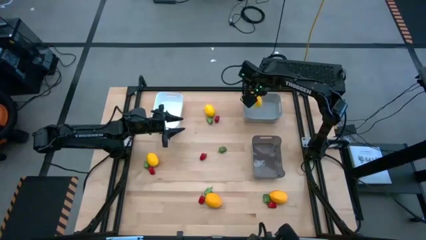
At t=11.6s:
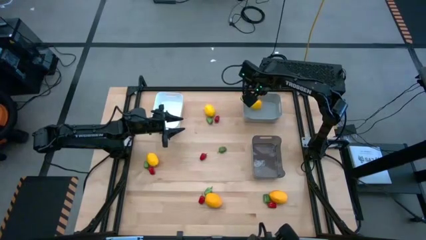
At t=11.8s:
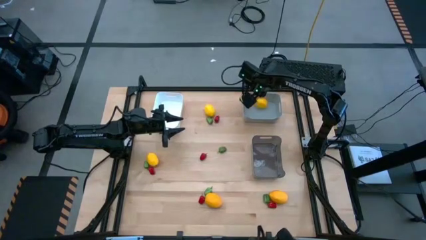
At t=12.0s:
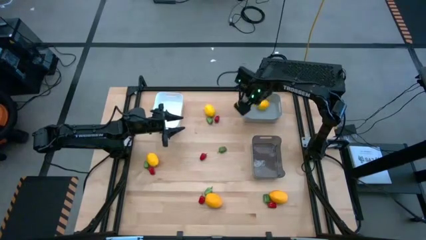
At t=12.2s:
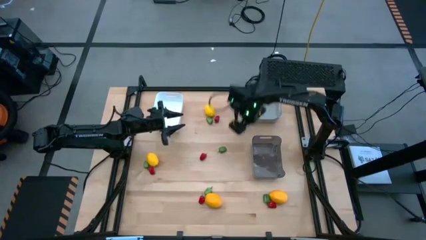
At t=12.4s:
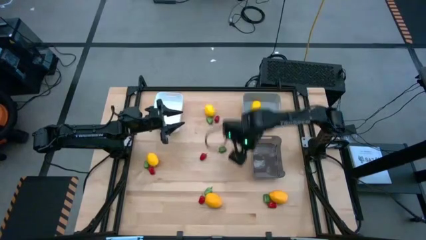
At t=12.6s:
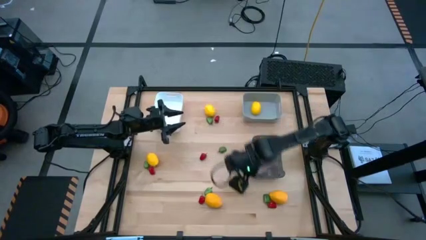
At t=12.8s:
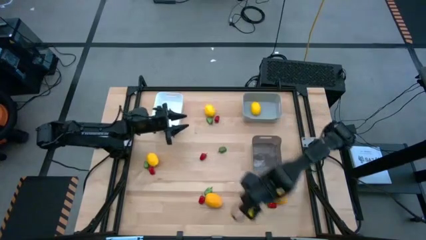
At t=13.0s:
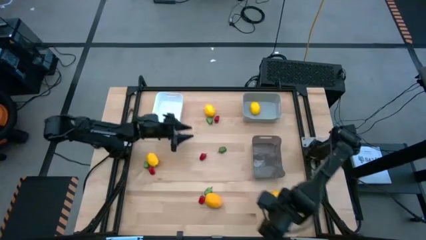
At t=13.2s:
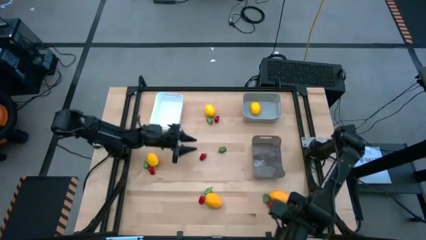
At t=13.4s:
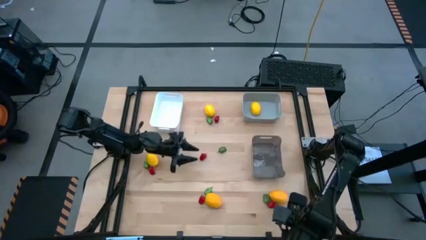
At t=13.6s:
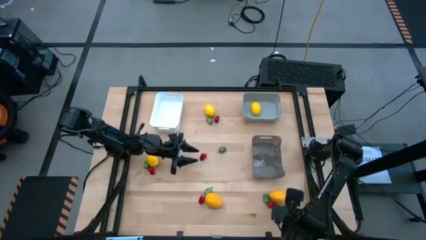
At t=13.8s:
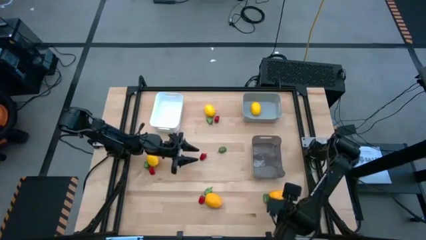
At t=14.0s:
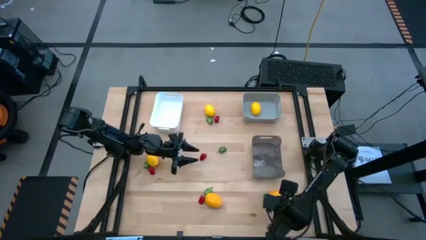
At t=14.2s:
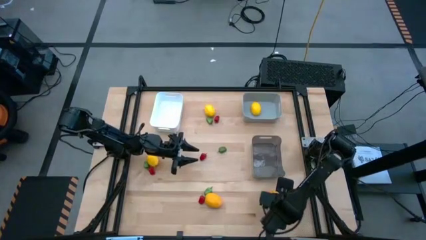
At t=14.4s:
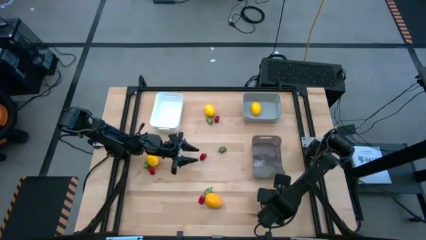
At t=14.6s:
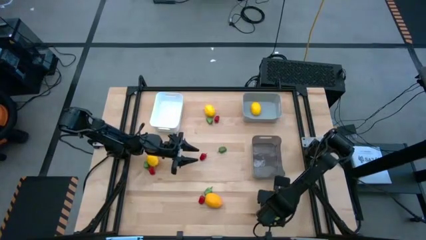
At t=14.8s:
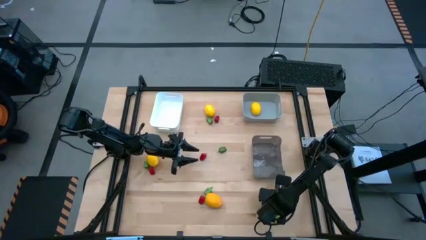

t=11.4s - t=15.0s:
Task: Sort produce into baskets
Put the yellow lemon into the gray bin

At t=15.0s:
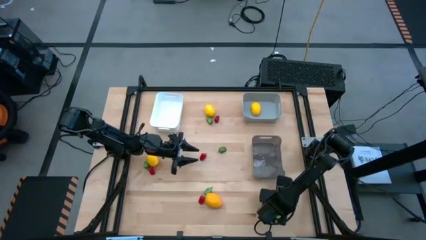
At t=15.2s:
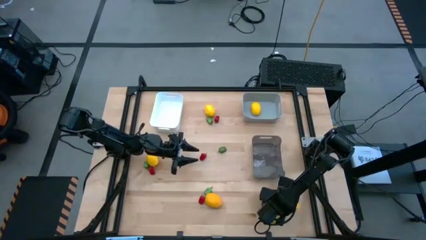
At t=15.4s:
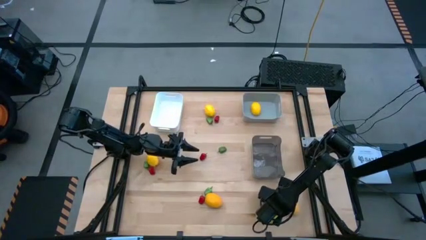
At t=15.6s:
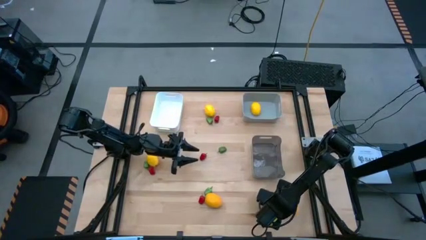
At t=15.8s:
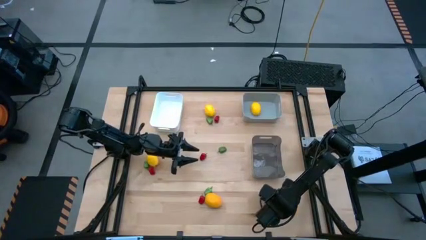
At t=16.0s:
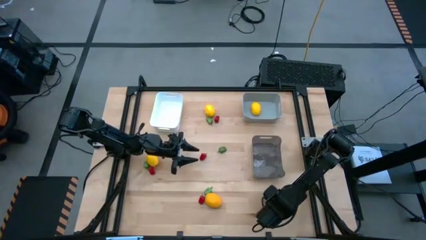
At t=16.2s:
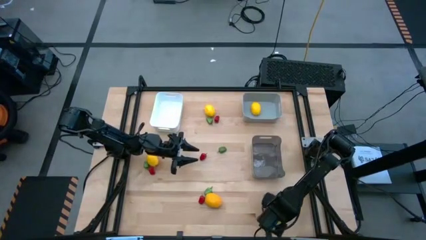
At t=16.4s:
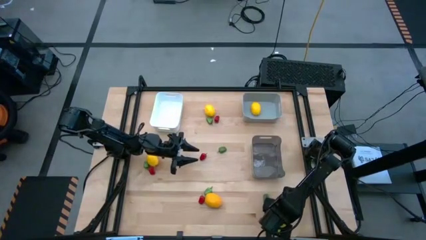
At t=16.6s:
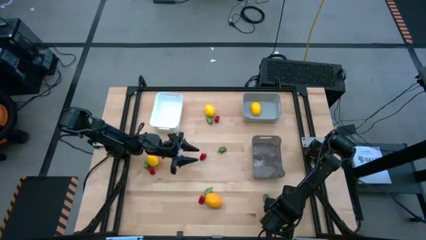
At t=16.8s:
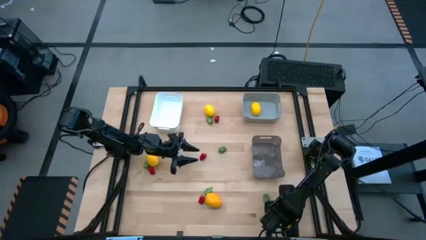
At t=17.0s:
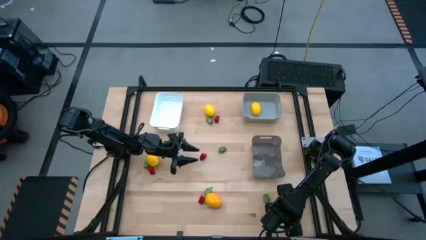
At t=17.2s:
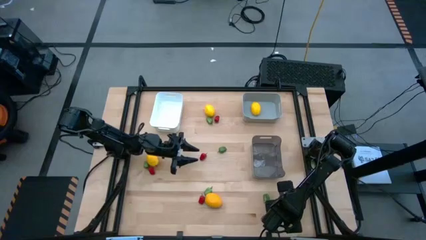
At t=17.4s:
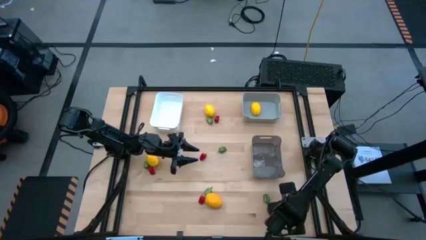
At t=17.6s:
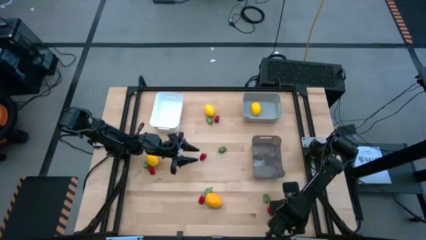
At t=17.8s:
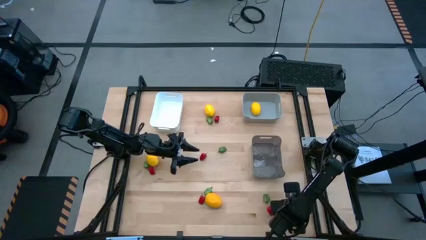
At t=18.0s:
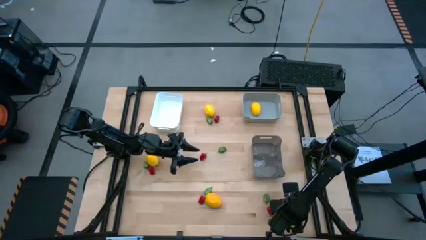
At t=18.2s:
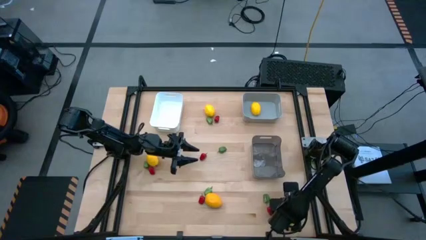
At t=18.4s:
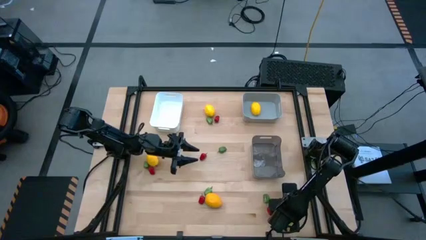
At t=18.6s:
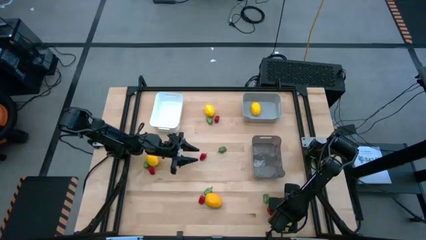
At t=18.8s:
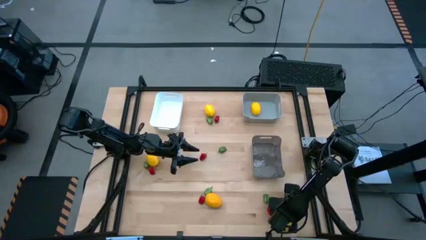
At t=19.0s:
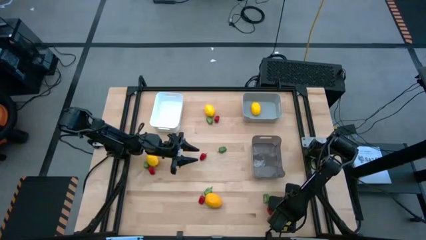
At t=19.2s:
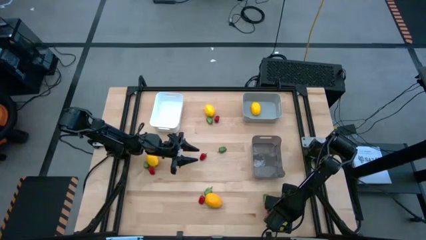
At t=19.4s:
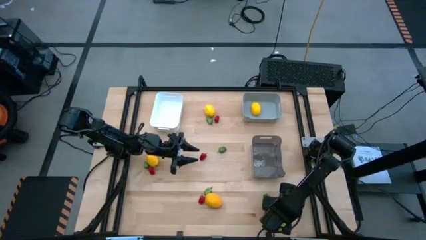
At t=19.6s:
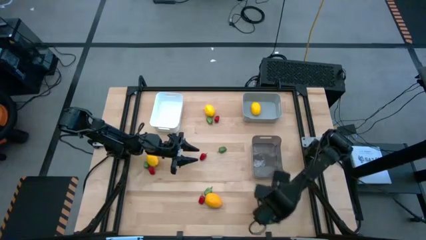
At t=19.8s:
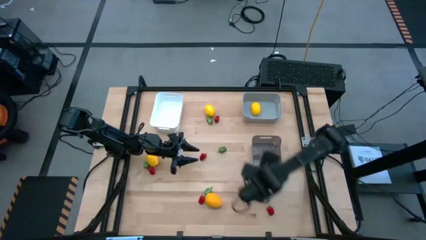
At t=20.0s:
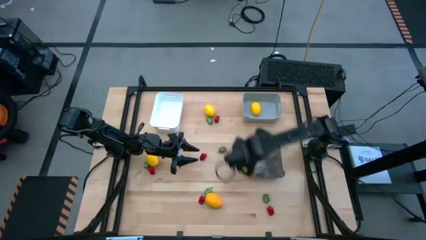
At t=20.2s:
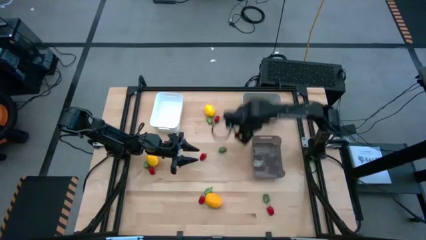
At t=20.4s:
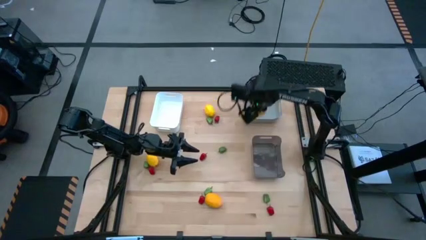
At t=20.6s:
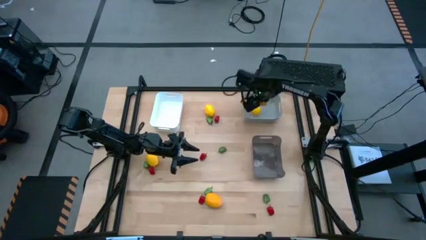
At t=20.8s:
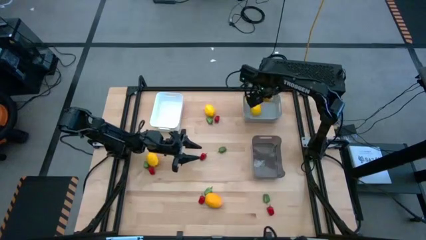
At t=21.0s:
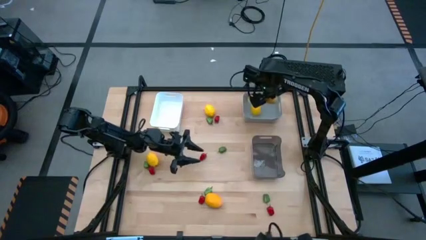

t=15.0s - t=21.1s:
Put the yellow lemon into the gray bin

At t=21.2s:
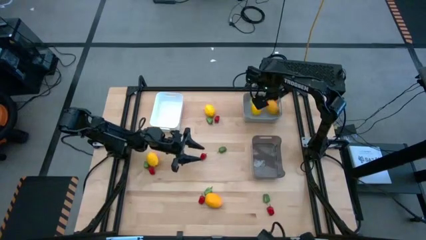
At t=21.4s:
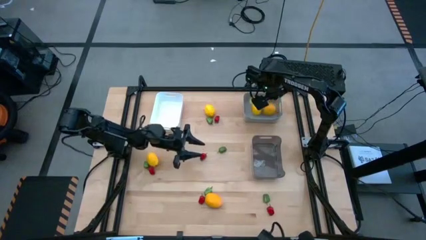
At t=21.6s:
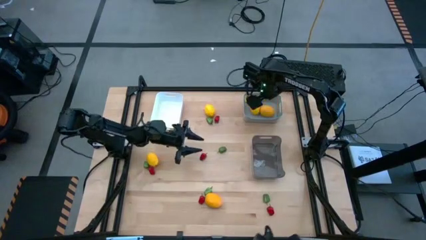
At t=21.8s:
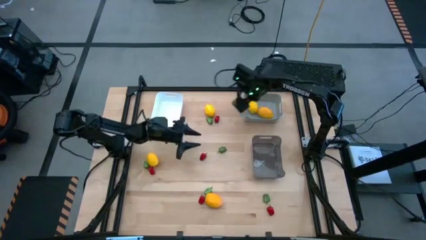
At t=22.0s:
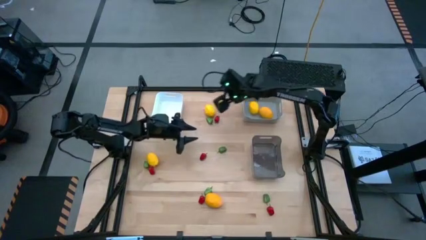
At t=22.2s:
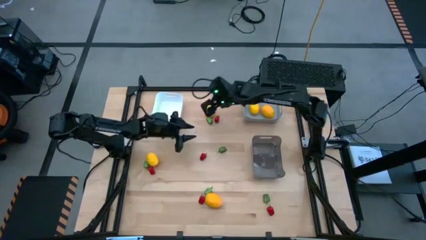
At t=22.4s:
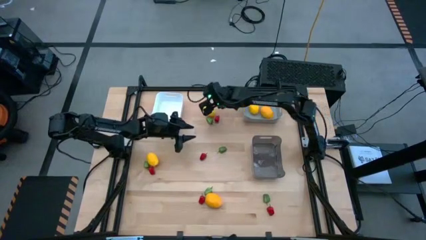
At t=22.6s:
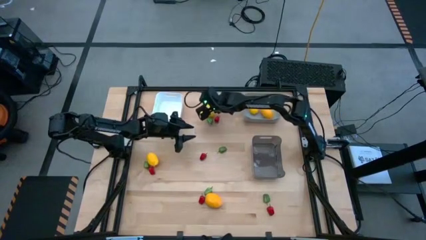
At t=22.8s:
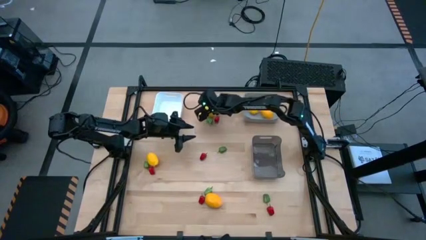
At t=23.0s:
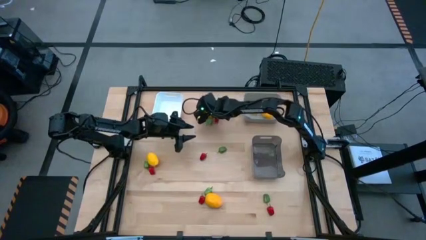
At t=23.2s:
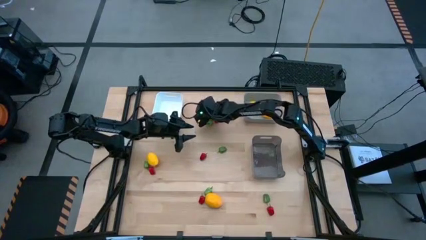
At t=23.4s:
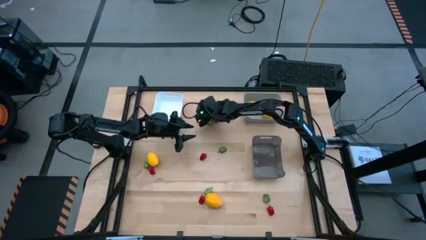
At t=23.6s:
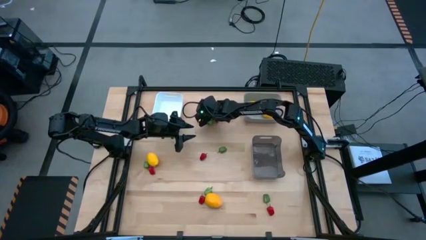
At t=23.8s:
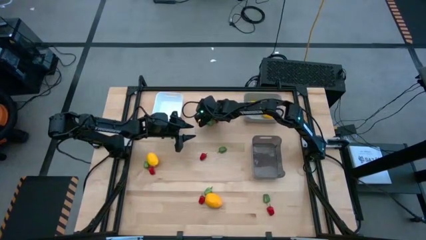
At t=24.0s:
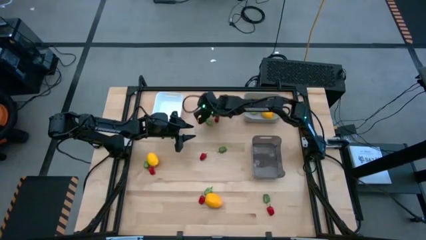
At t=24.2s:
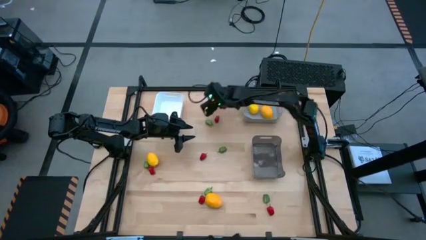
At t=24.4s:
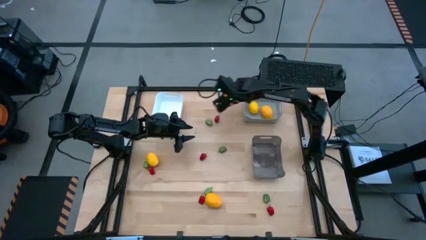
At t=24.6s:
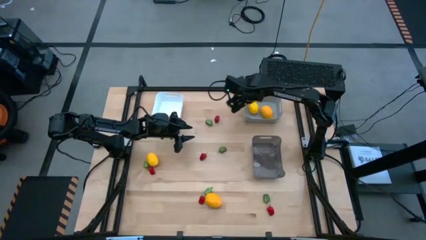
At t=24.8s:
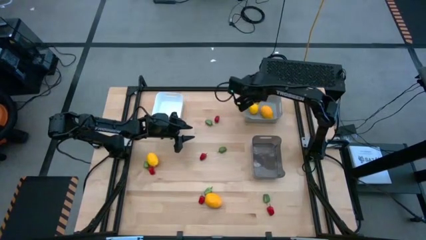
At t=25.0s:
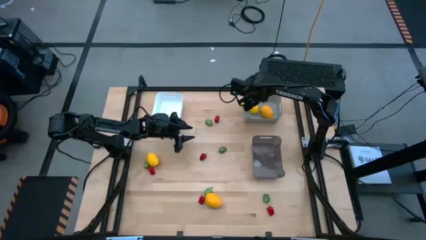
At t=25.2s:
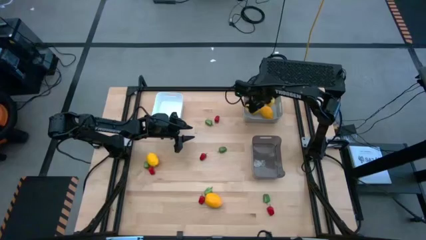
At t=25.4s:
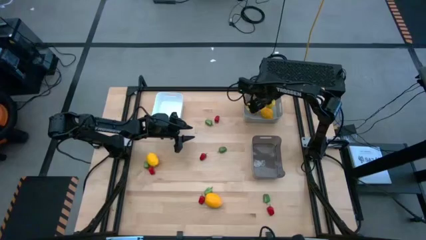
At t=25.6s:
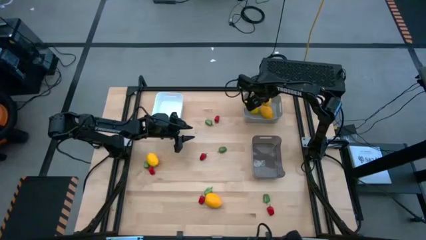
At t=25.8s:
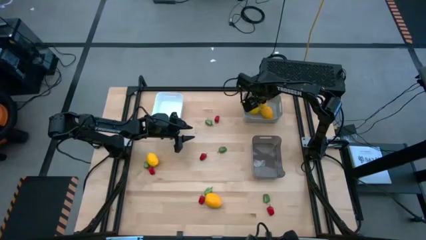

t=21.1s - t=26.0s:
Put the yellow lemon into the gray bin
